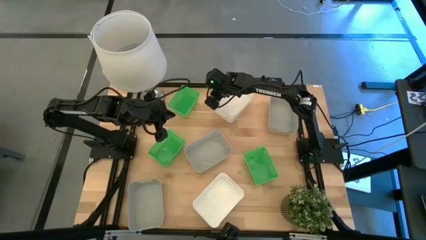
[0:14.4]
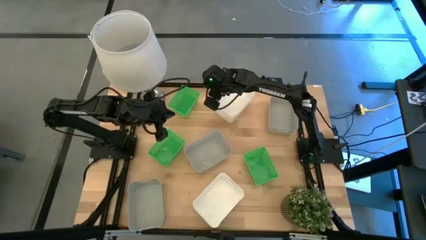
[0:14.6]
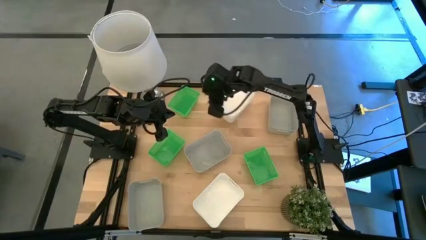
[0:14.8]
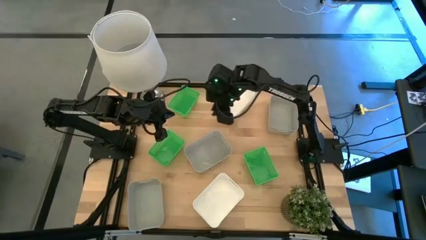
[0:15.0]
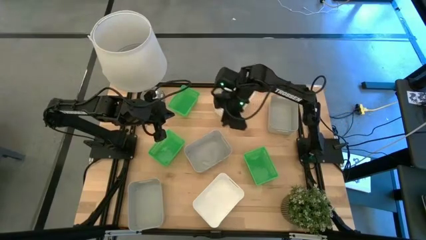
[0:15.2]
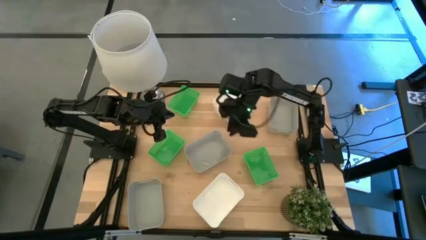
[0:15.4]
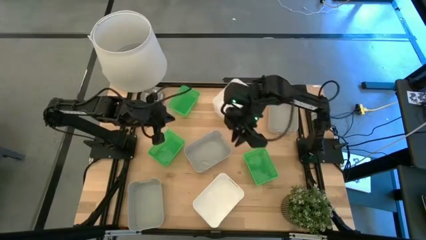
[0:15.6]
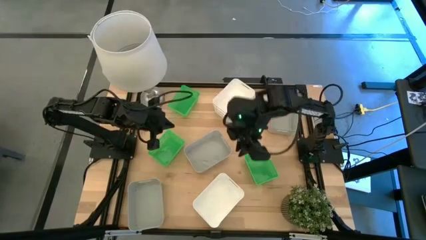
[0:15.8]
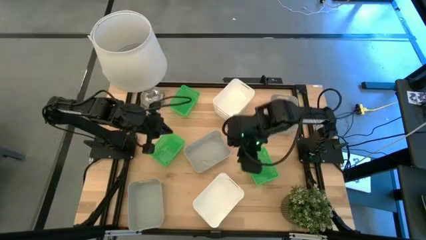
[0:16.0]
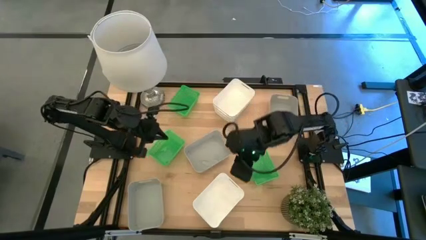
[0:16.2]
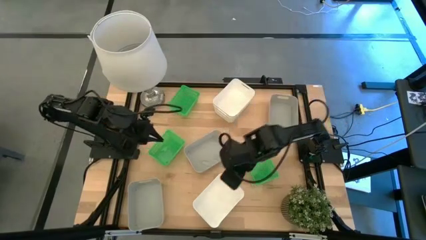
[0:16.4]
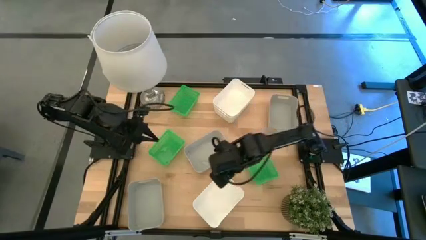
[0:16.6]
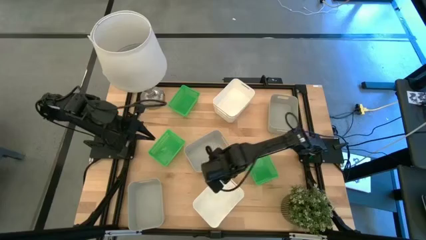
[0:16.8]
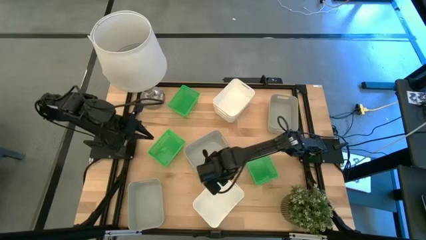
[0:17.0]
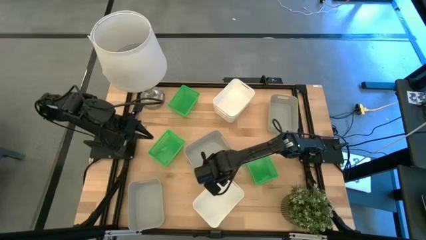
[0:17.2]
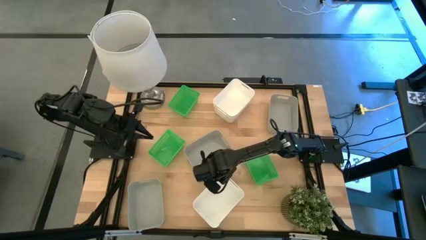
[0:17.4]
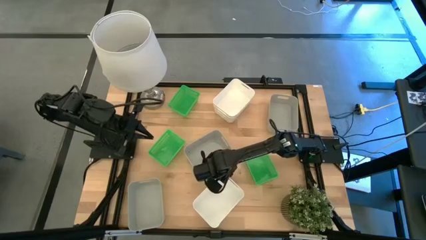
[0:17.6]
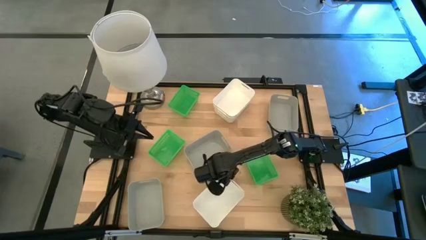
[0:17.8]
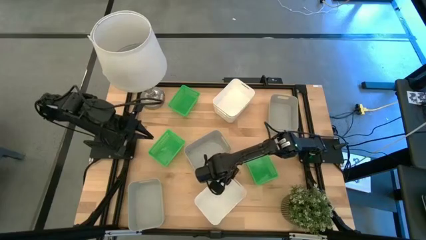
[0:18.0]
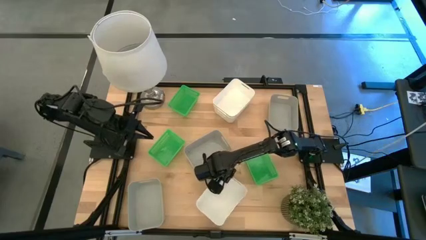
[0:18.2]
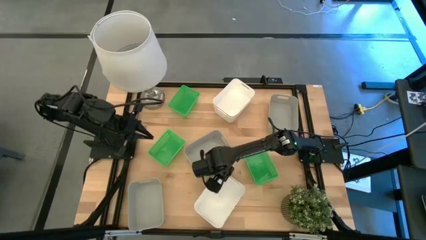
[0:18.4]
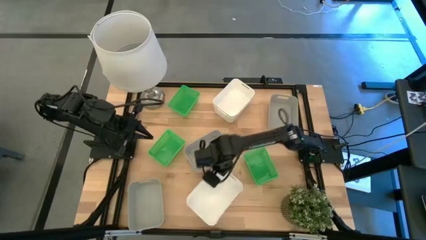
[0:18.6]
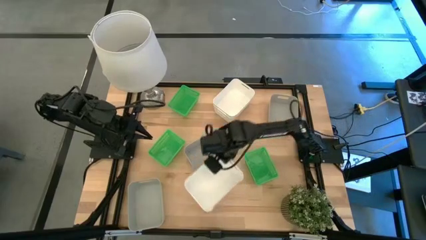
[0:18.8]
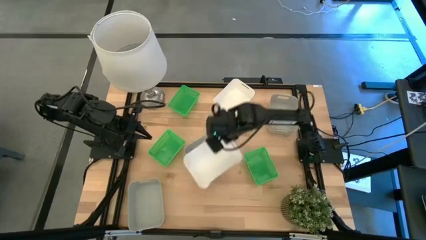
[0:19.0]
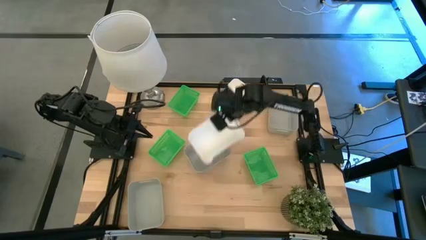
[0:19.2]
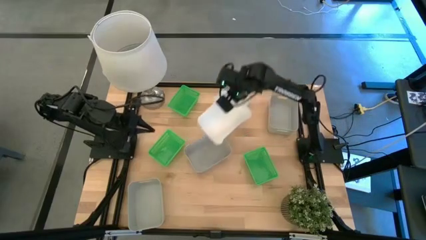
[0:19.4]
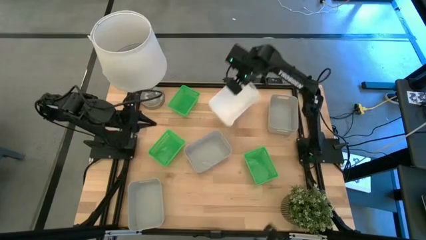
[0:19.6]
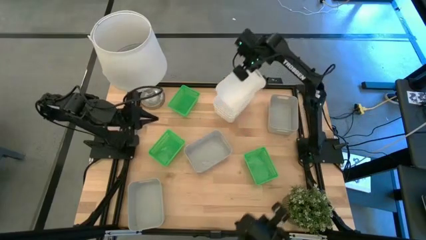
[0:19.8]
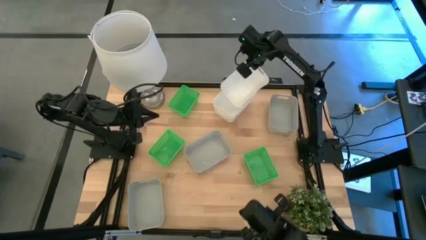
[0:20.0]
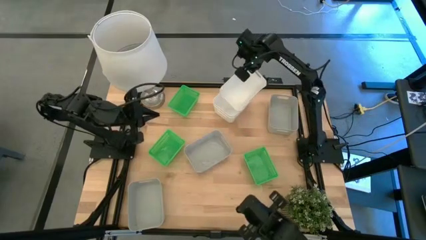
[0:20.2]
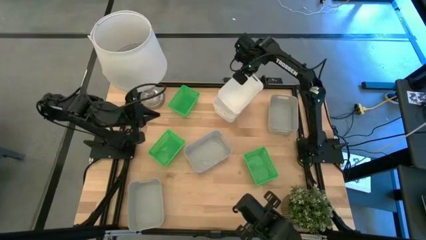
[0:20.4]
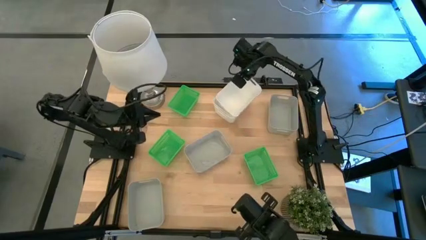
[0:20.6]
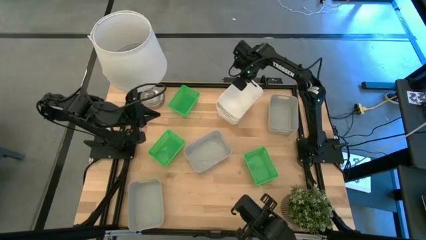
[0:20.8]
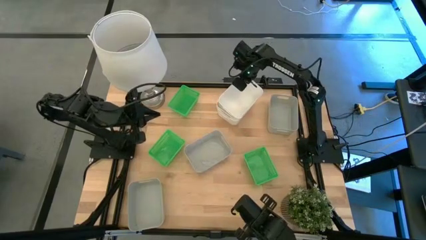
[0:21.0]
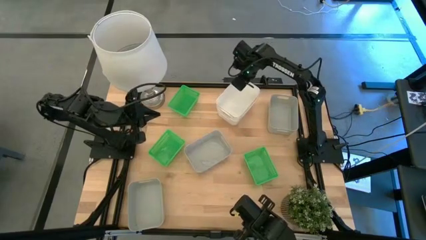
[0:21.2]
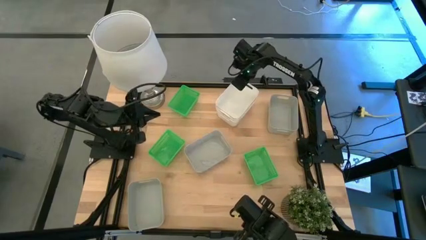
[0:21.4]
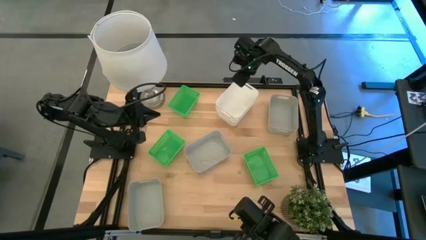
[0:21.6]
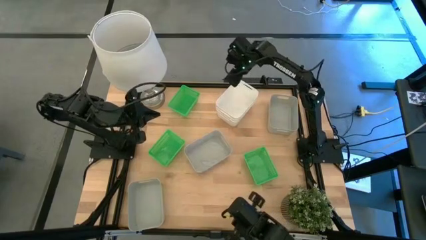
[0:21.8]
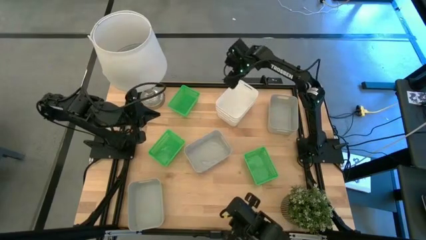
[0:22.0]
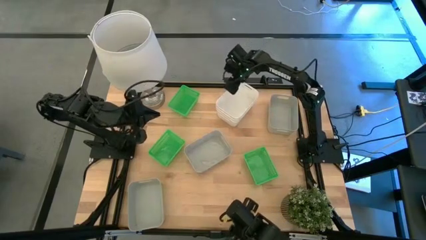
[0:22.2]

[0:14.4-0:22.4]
Stack the bottom white bin on the white bins

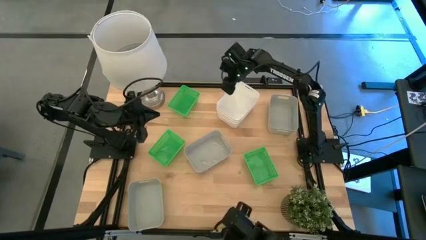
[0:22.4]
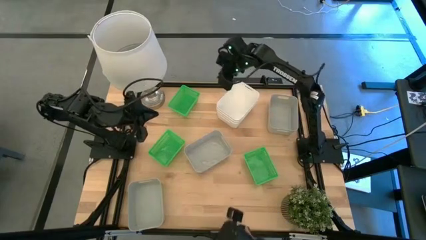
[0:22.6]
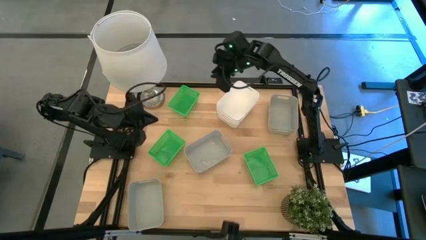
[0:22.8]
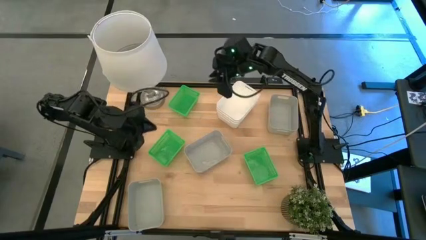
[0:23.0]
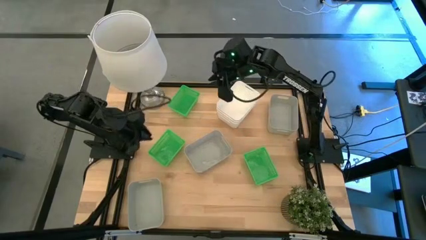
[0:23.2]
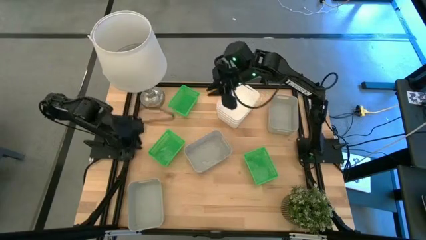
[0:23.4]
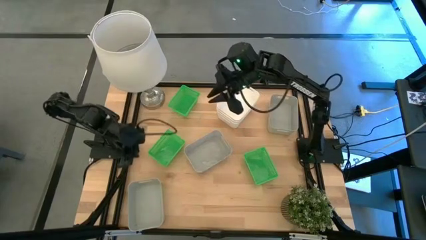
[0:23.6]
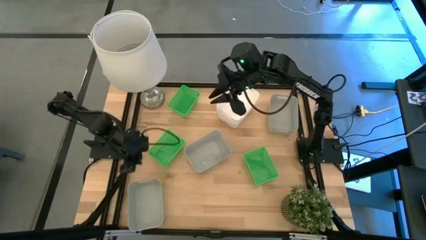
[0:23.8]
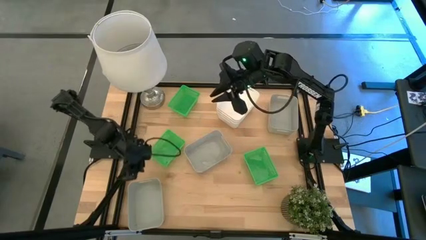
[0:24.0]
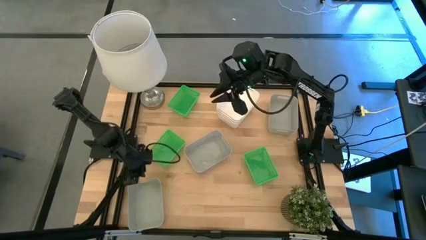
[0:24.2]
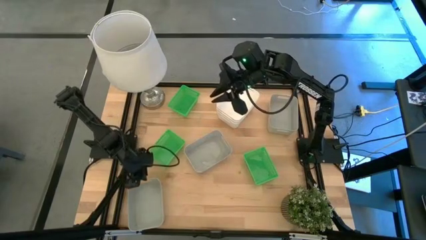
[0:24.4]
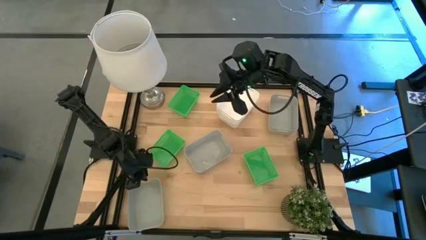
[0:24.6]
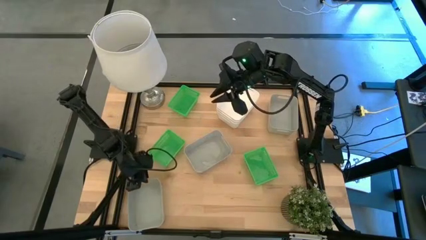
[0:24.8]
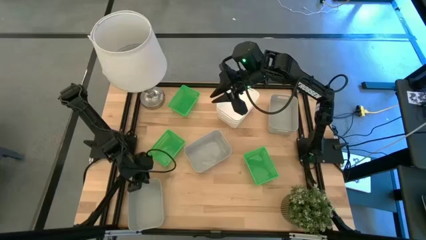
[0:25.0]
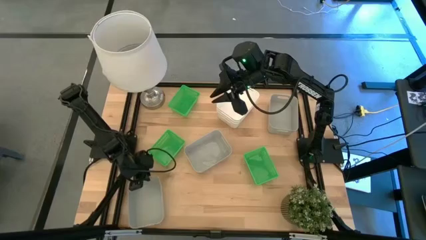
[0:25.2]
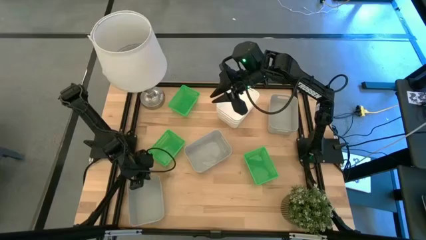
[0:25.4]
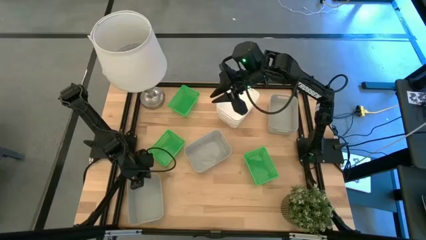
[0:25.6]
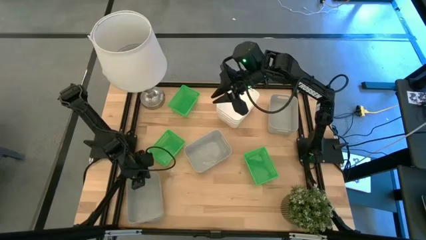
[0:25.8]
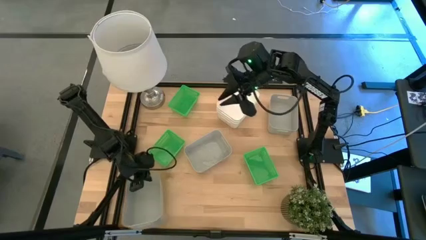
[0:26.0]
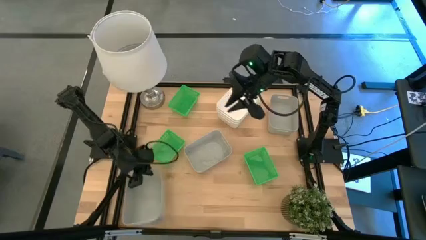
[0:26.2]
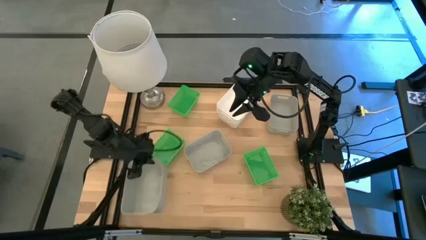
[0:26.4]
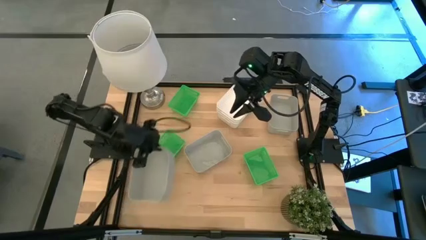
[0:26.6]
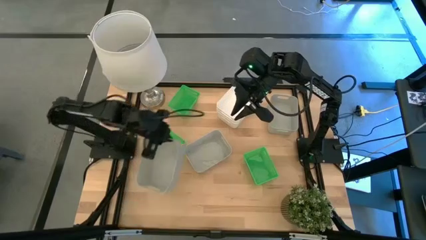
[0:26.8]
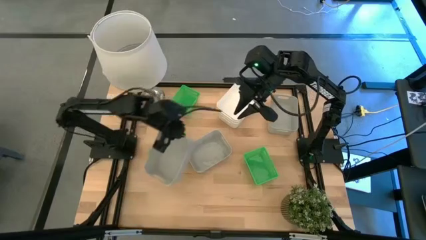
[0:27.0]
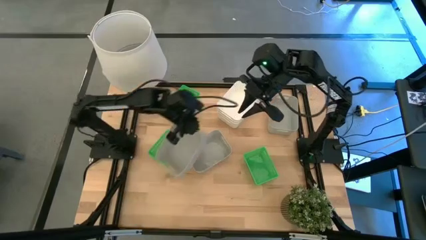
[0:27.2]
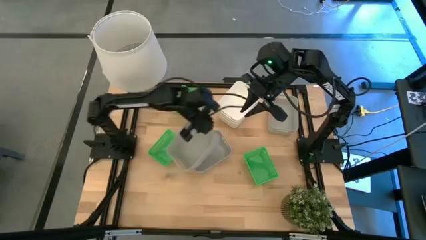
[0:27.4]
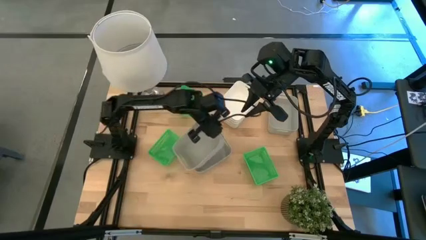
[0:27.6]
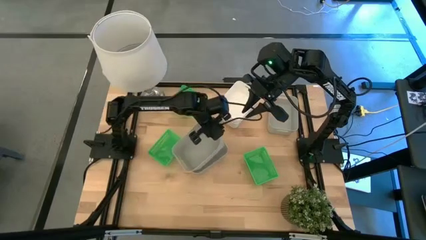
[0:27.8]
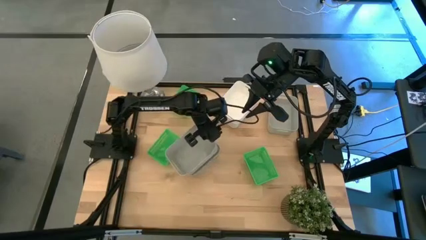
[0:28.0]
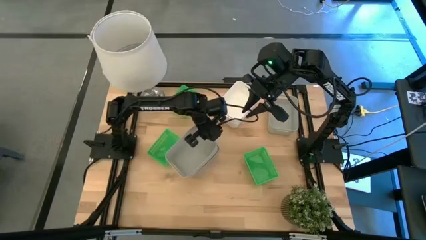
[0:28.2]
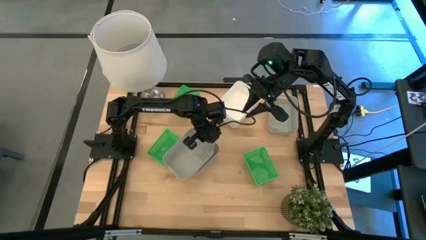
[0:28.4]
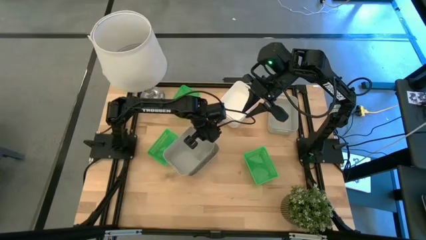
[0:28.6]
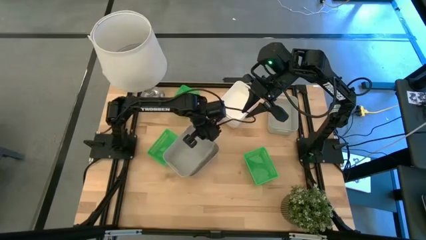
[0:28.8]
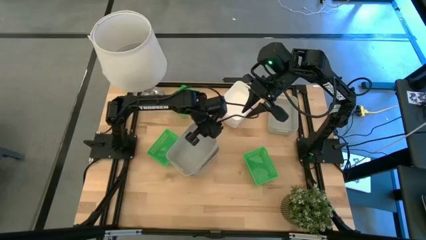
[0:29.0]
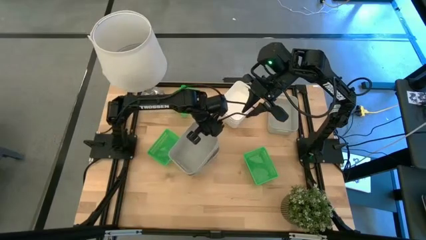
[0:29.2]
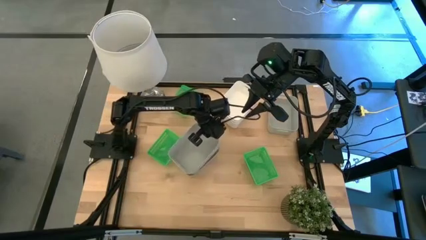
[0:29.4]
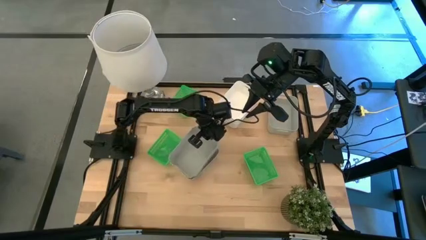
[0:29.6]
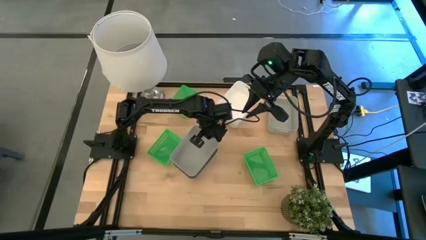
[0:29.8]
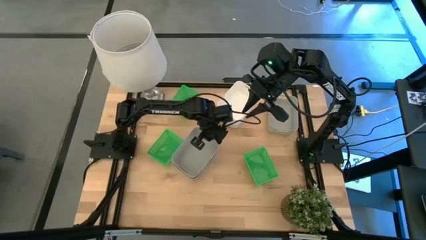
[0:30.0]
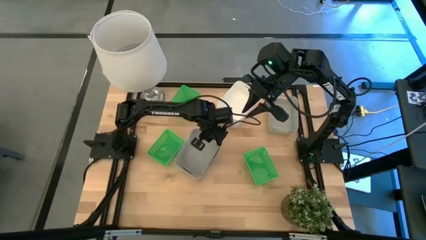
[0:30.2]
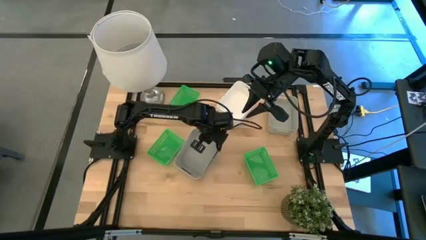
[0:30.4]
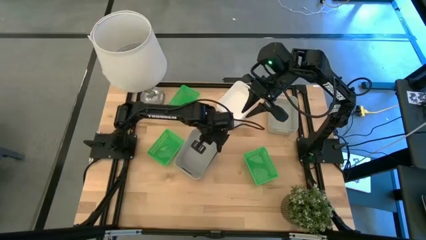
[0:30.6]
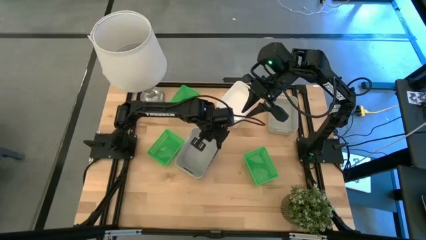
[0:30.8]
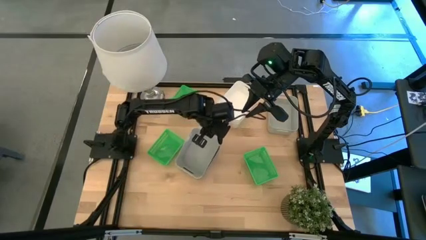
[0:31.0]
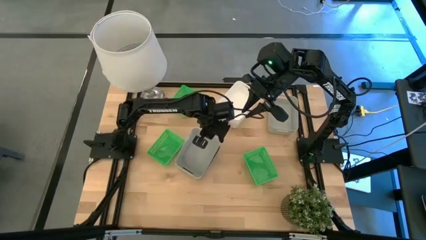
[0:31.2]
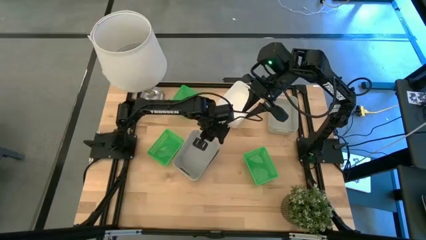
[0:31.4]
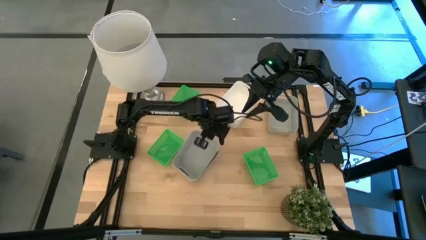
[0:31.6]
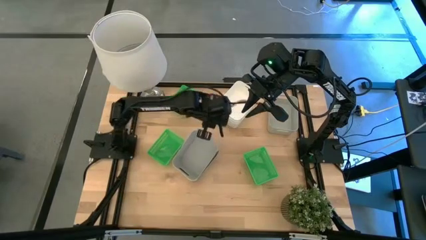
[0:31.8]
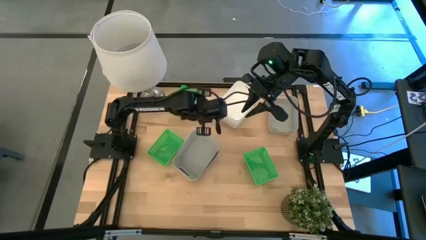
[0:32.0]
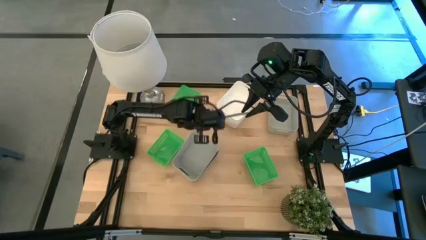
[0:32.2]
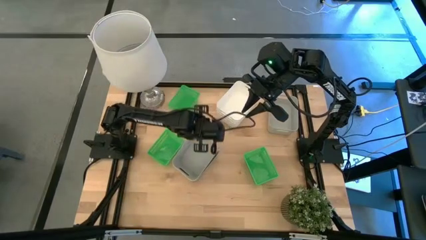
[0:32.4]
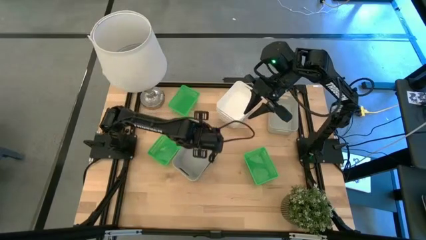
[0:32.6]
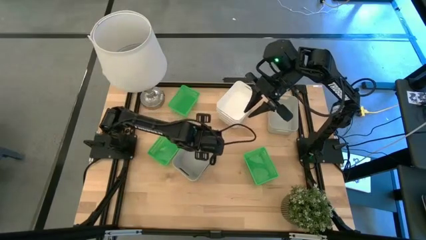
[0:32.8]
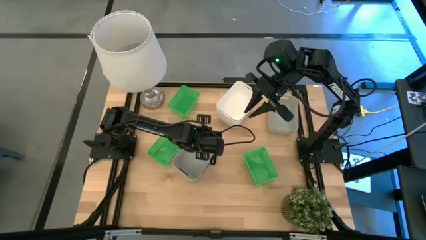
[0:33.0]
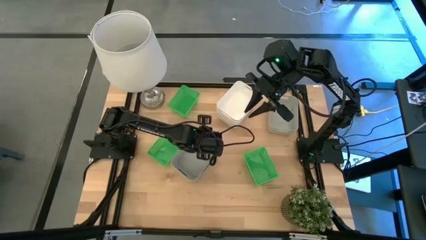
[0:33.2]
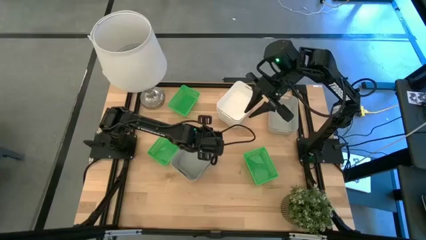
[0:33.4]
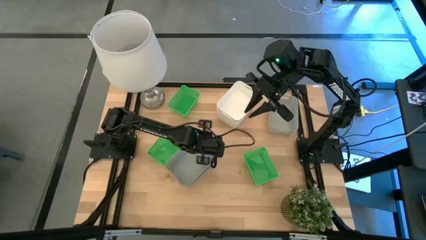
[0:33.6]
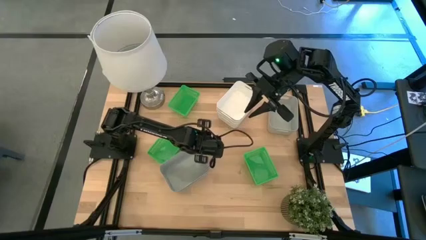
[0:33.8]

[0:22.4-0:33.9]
Stack the bottom gray bin on the middle gray bin
